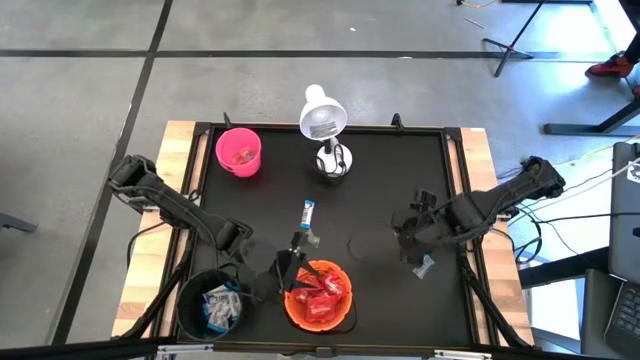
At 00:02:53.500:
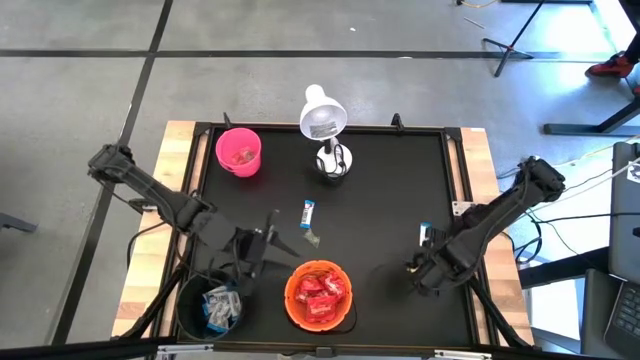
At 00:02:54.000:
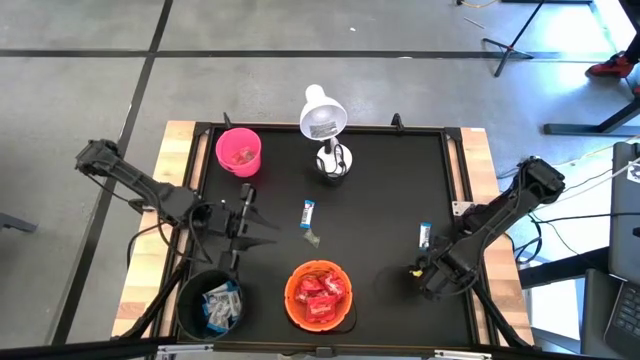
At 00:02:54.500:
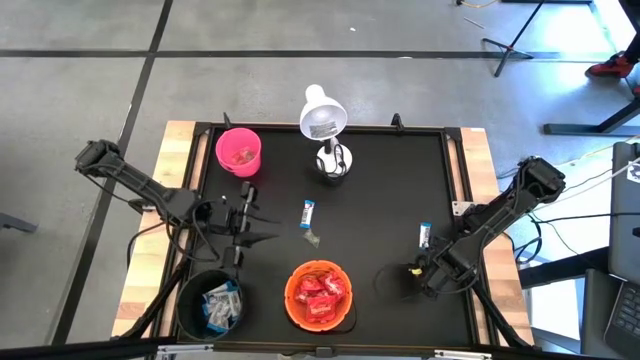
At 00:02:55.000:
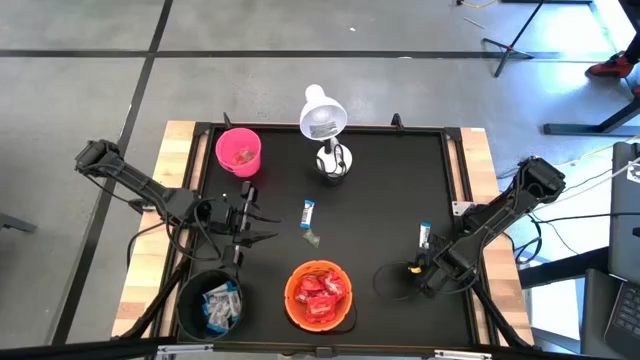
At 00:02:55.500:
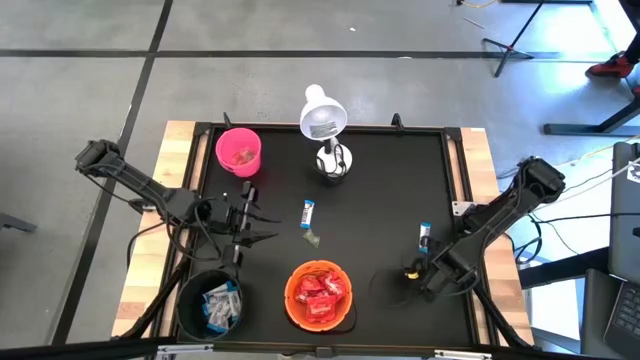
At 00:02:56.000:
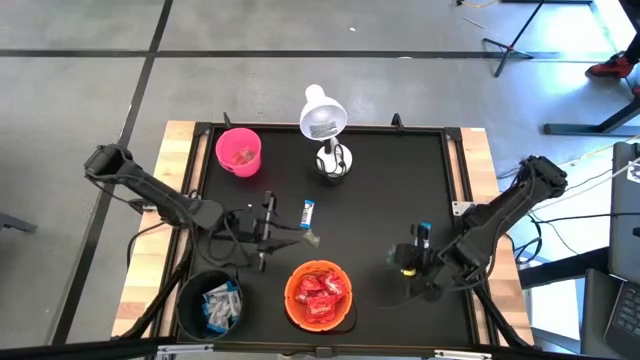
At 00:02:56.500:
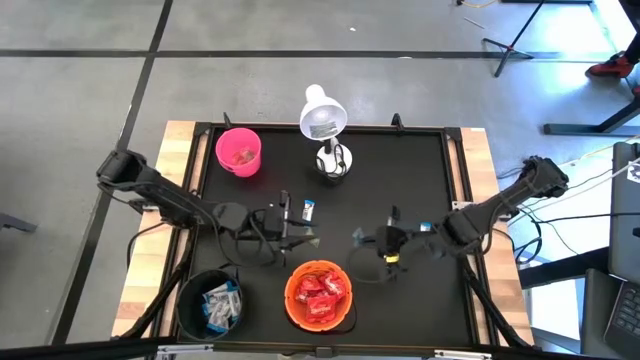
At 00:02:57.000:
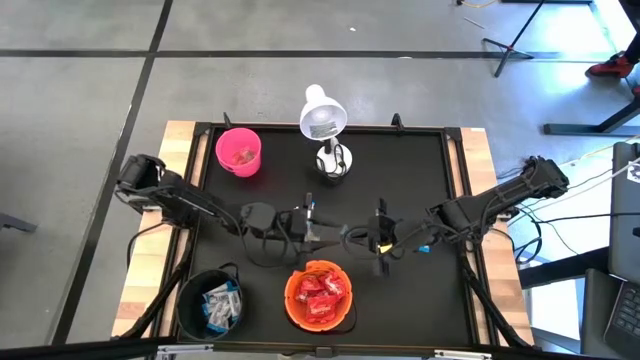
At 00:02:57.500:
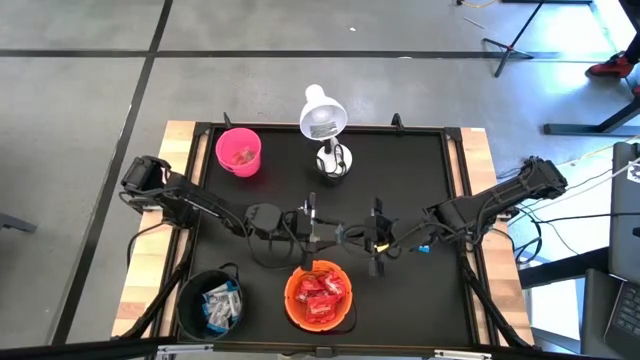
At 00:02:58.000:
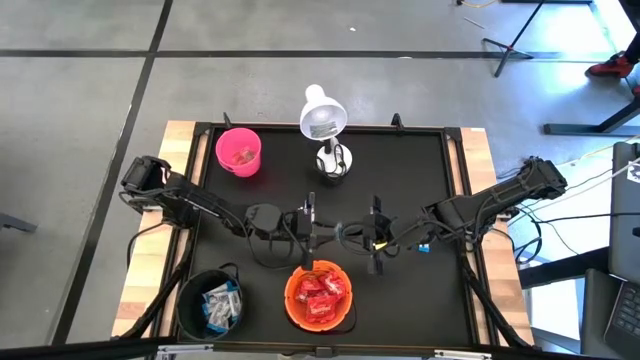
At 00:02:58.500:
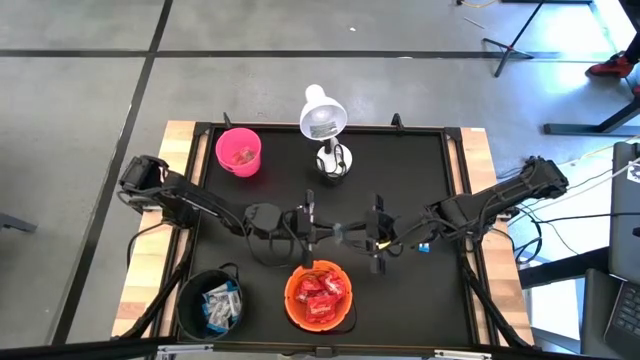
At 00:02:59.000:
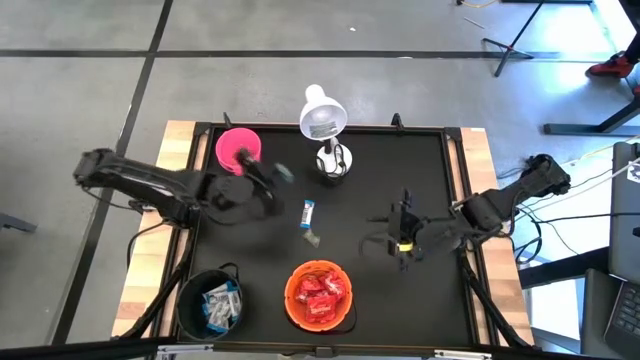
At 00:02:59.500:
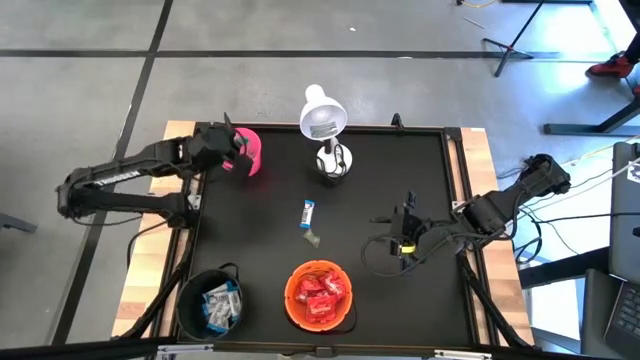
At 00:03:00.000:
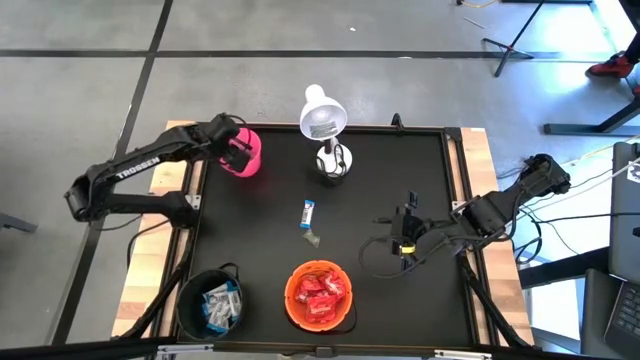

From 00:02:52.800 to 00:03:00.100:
Task: Sort candy
Put the blue candy into the pink bucket

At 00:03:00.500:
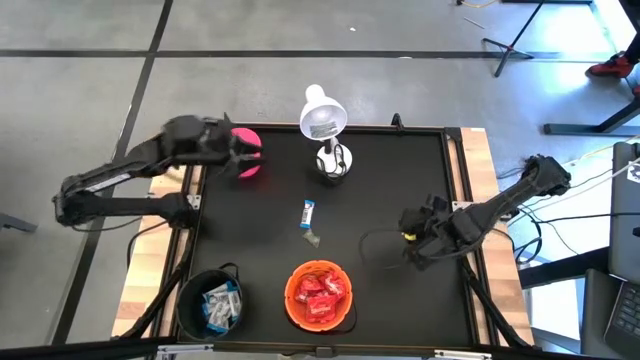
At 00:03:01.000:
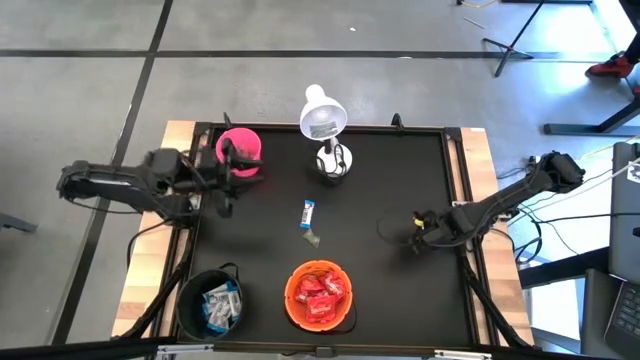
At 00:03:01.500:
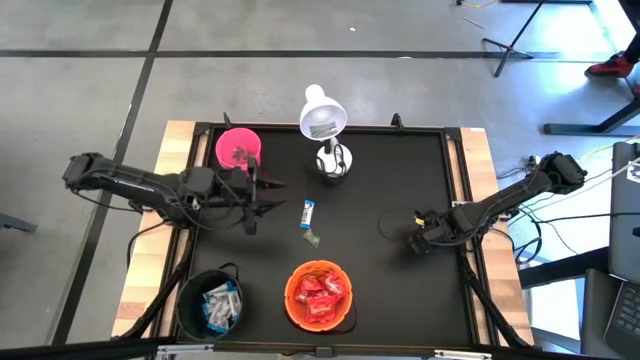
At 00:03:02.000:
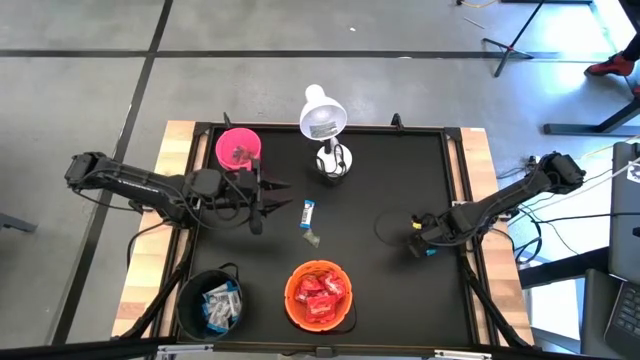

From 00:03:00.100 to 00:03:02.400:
Put the white candy into the black bucket

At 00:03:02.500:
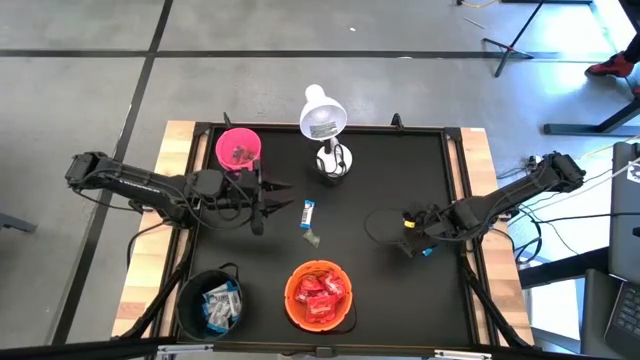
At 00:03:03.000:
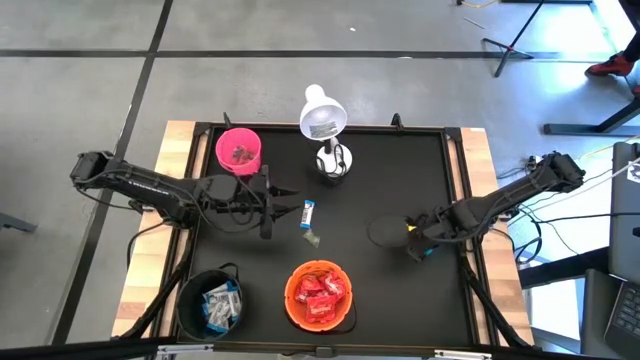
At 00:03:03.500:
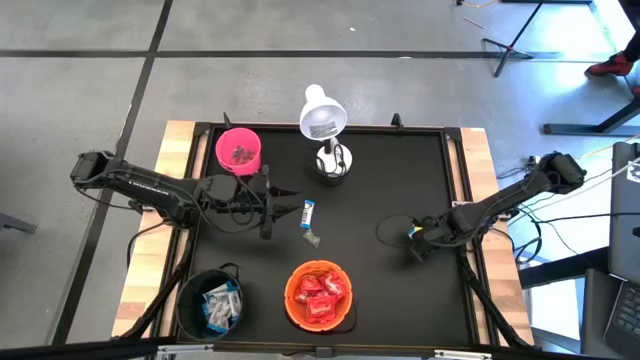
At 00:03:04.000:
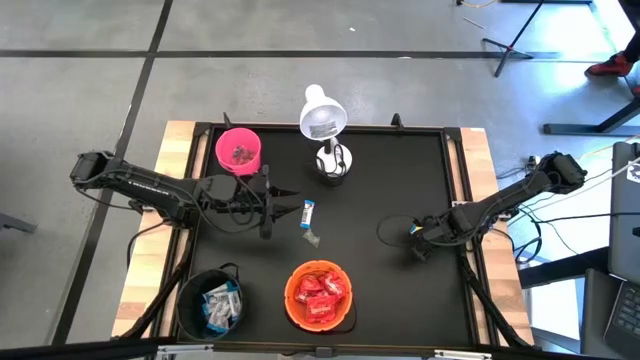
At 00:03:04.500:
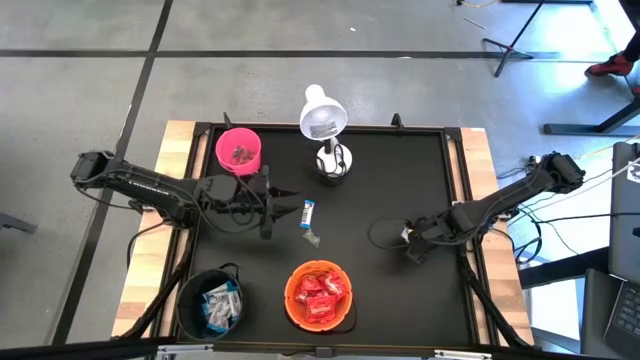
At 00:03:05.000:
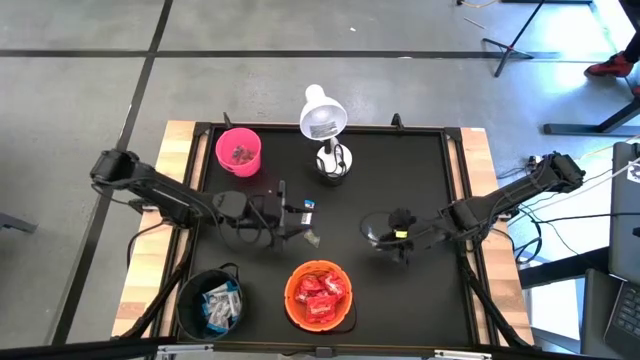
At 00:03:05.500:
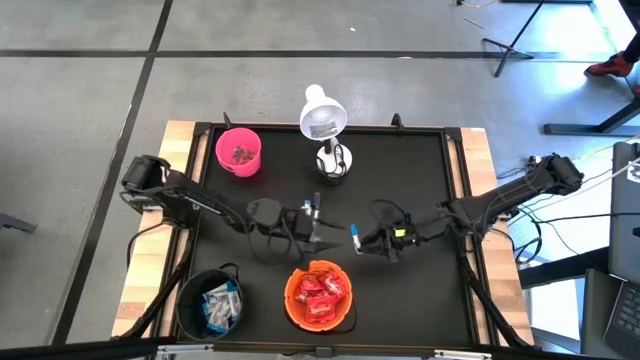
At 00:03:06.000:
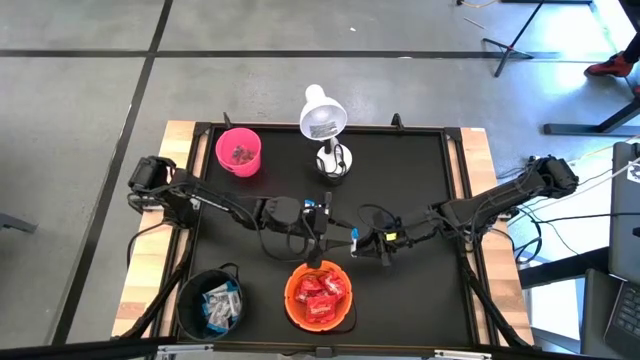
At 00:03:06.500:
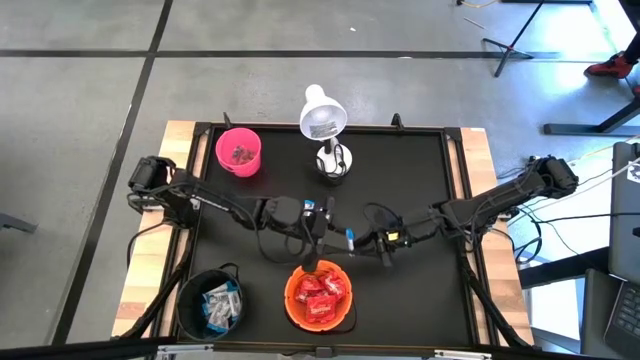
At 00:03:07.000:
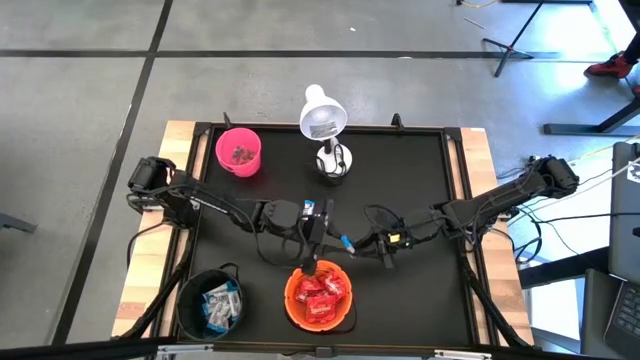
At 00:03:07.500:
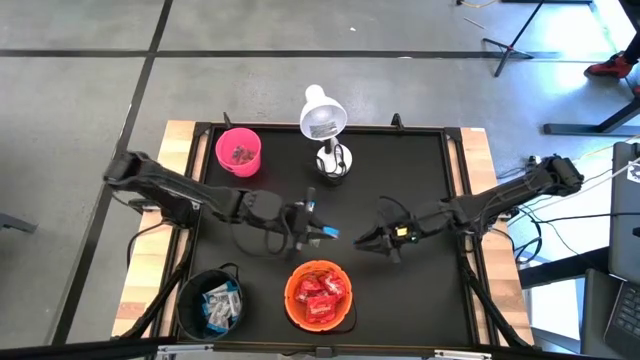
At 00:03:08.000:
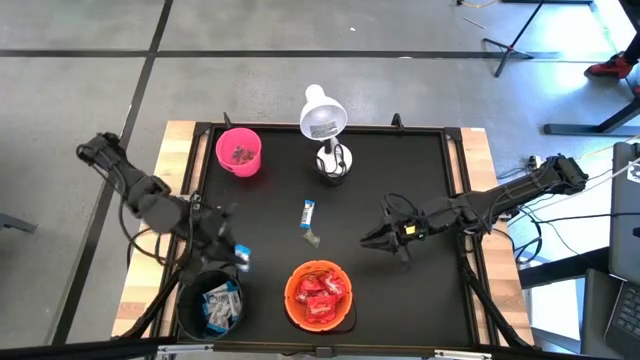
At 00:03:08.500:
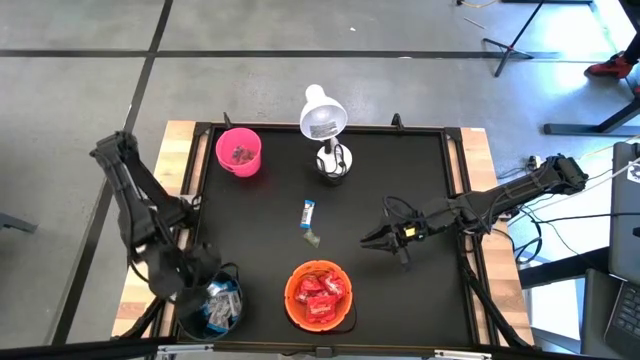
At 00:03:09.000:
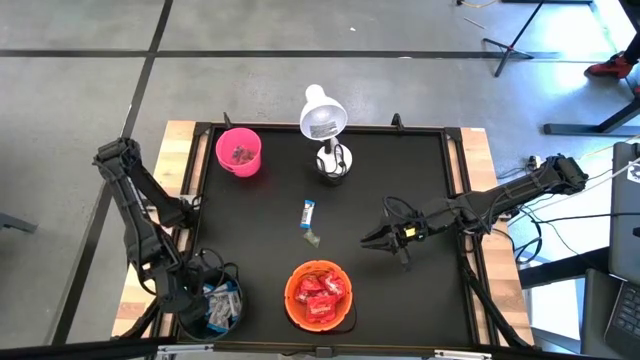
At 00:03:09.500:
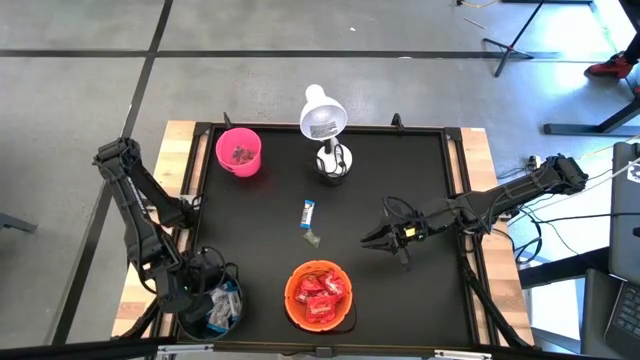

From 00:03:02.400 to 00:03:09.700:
Put the white candy into the black bucket

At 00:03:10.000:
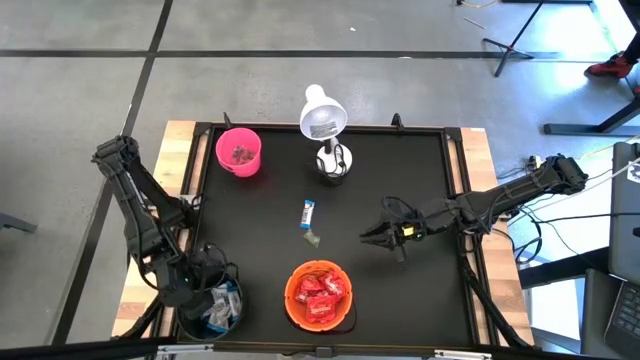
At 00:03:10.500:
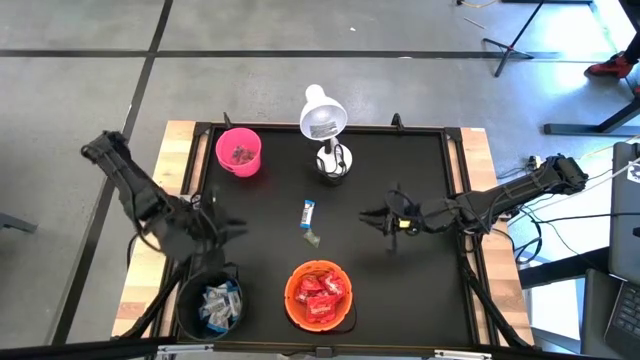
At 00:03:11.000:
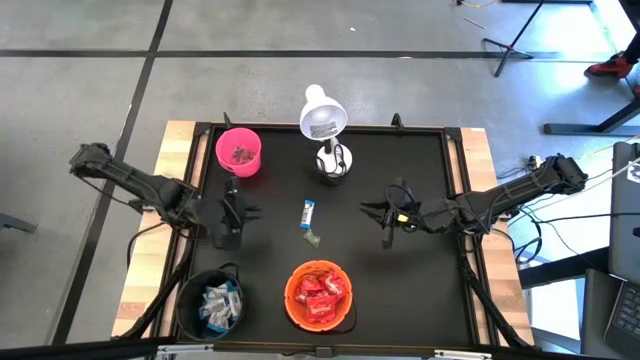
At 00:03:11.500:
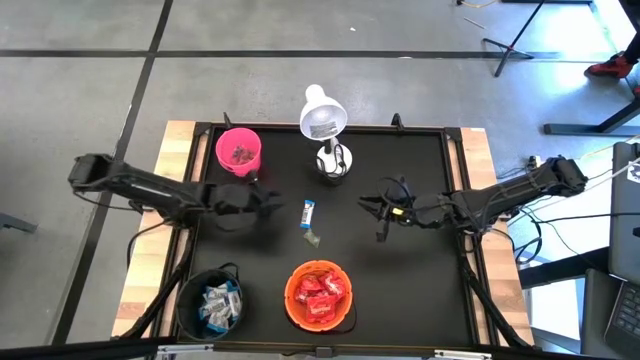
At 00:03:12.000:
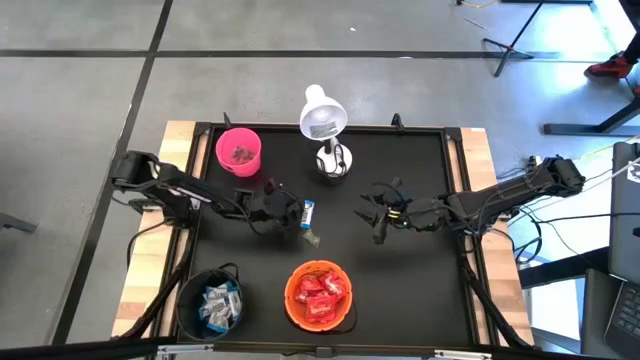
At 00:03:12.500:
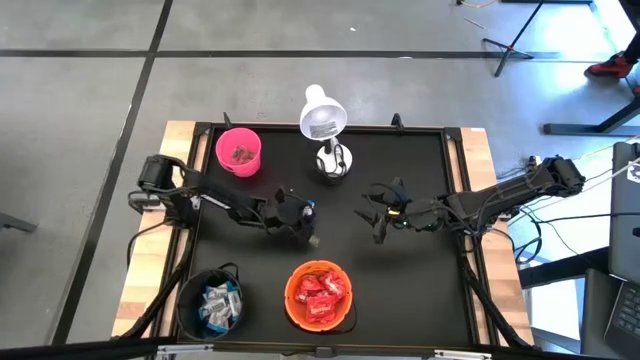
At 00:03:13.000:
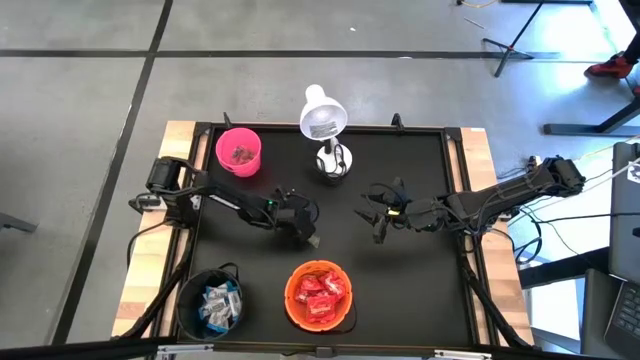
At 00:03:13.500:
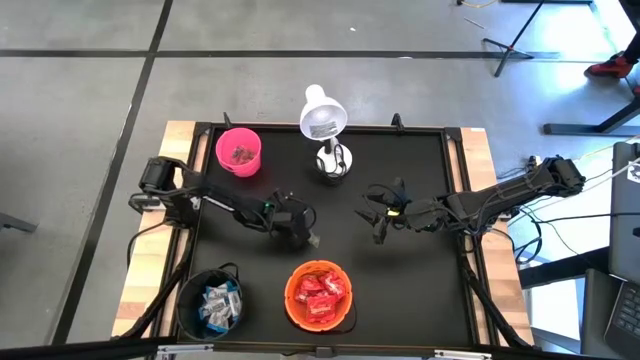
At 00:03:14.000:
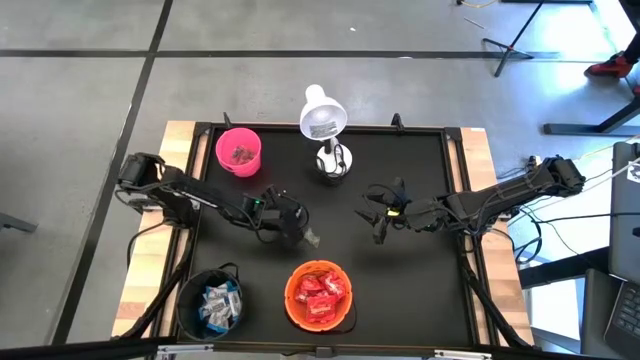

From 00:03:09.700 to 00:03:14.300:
Put the white candy into the black bucket
